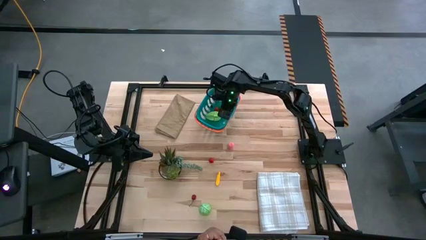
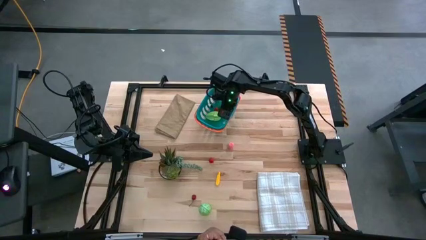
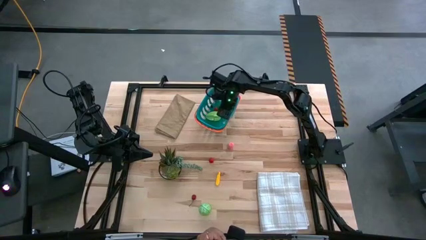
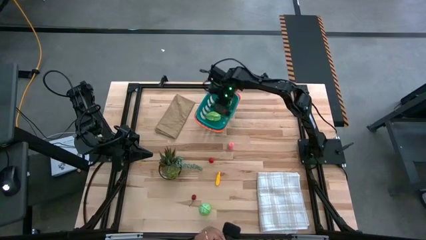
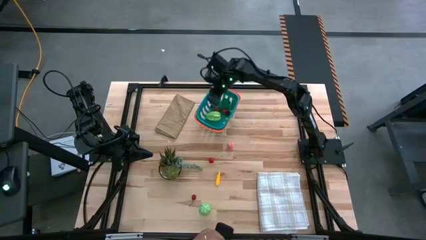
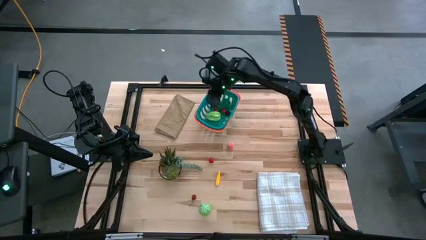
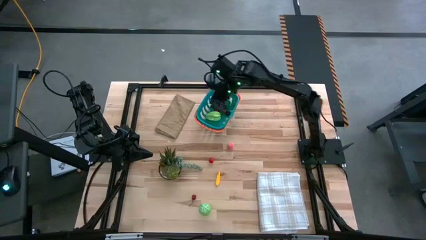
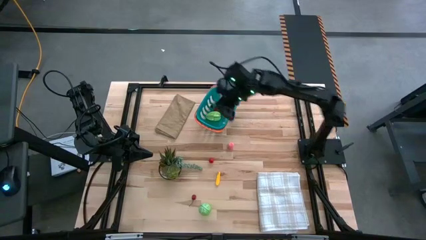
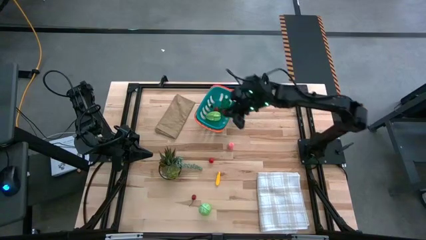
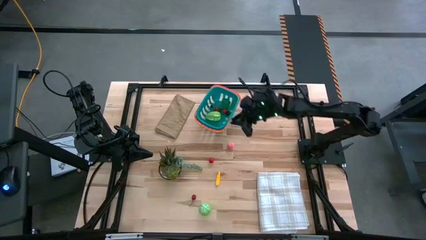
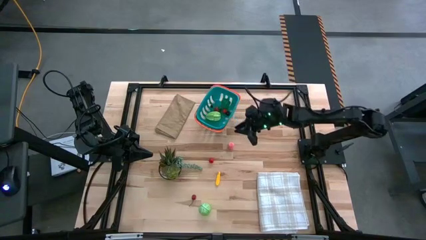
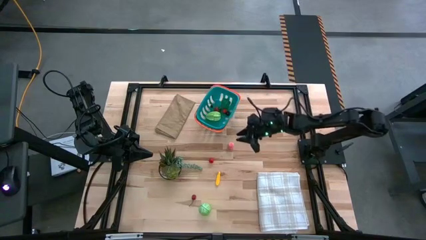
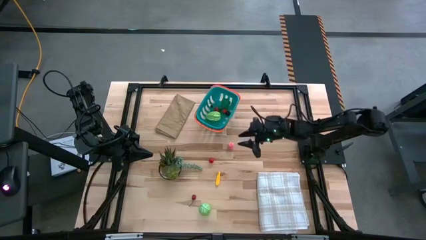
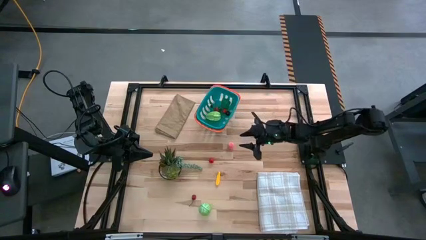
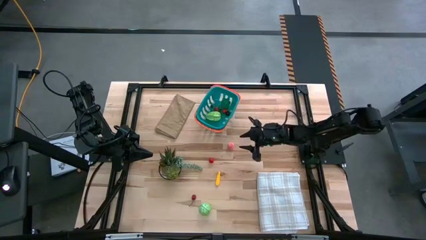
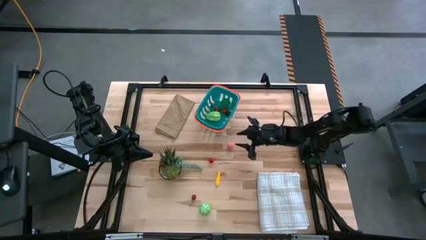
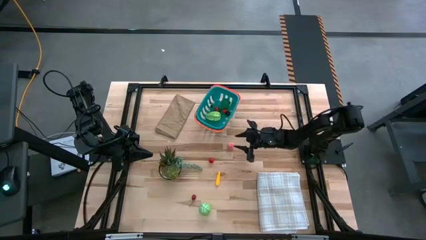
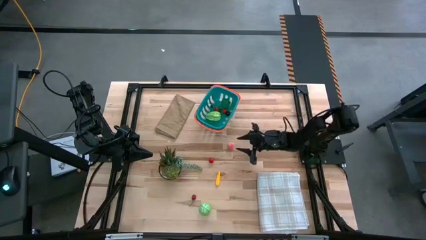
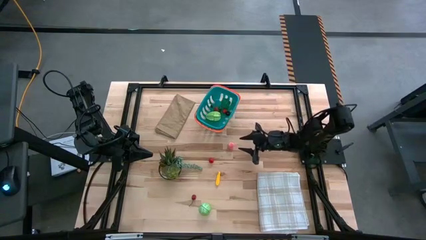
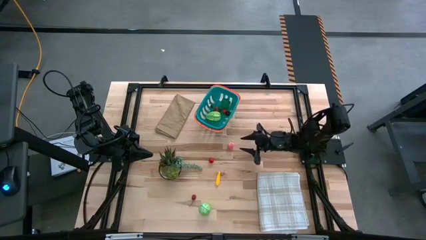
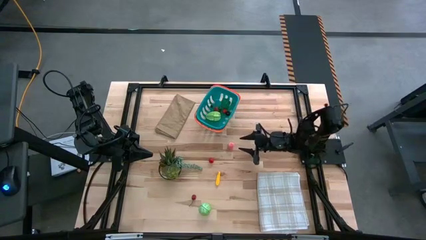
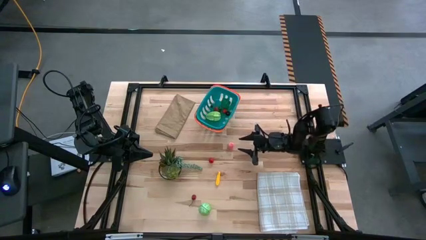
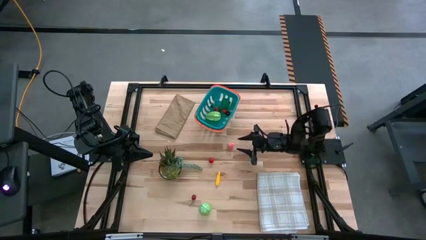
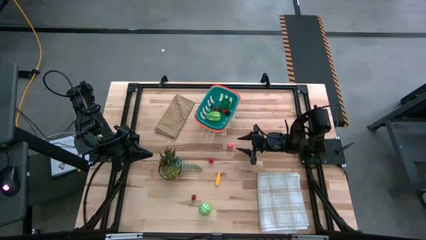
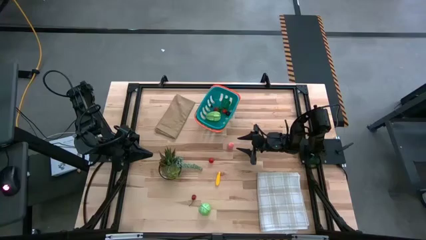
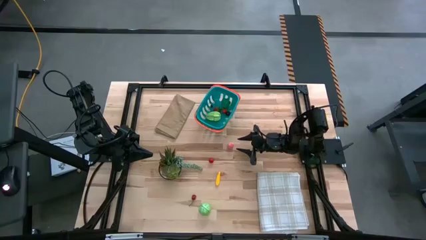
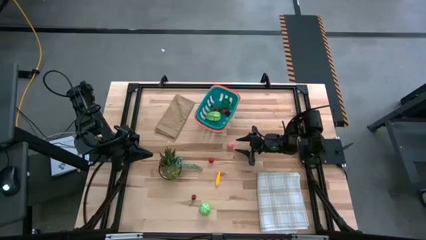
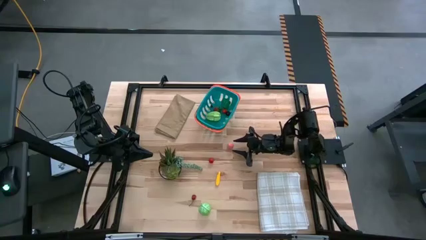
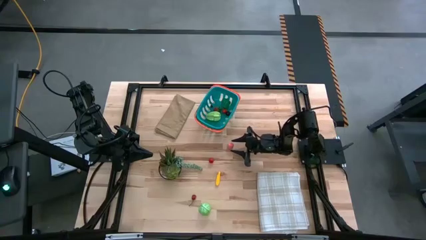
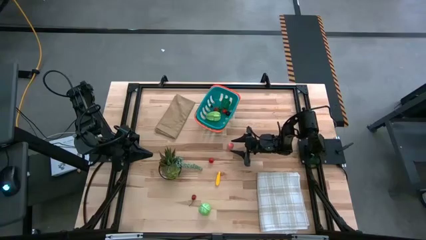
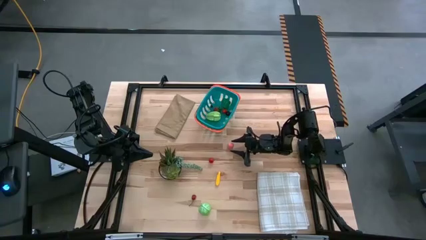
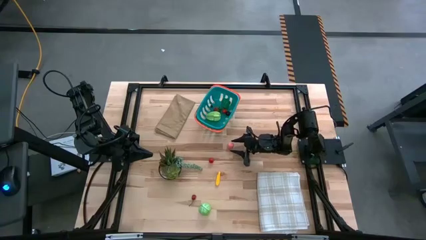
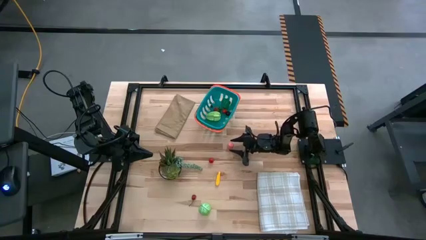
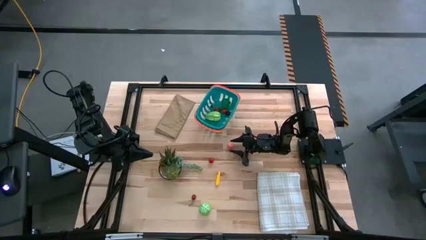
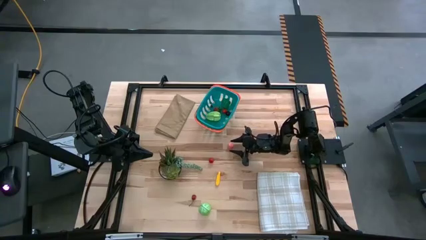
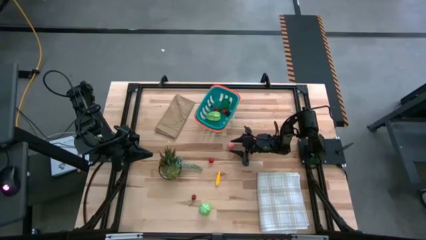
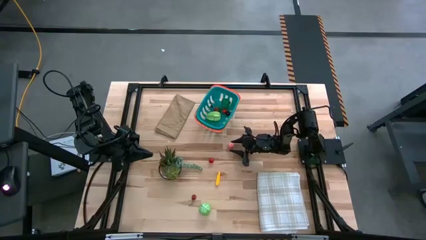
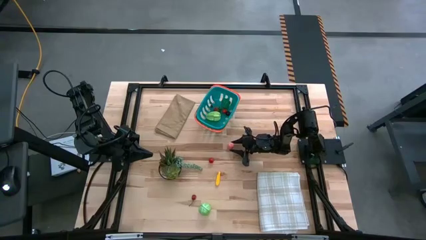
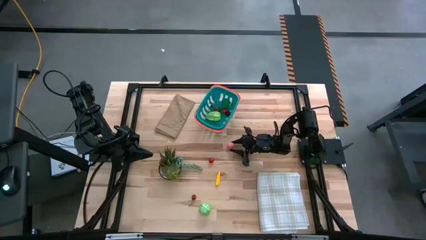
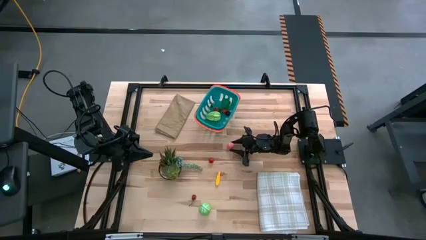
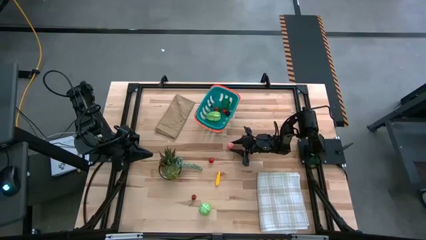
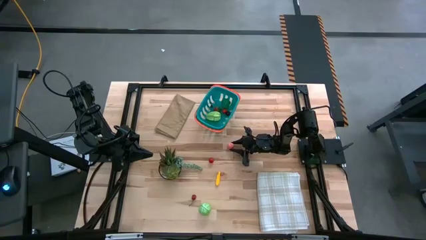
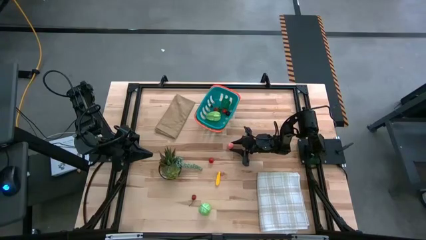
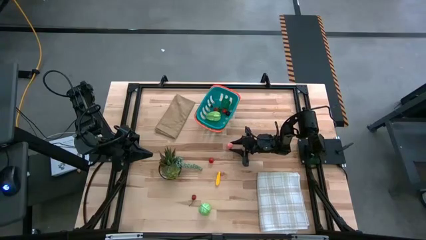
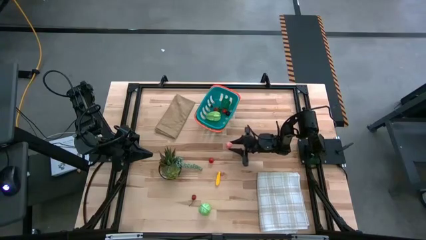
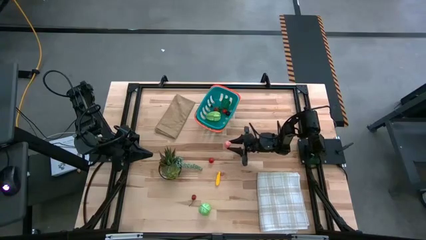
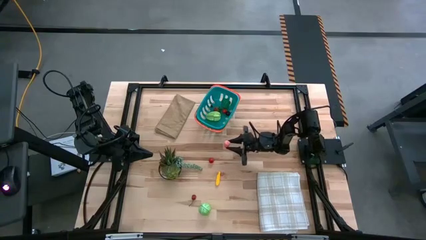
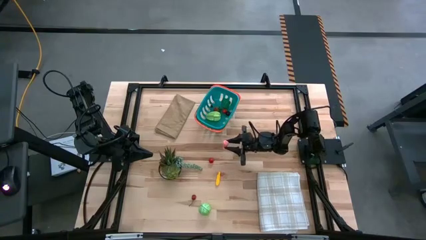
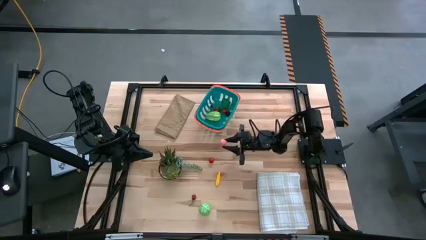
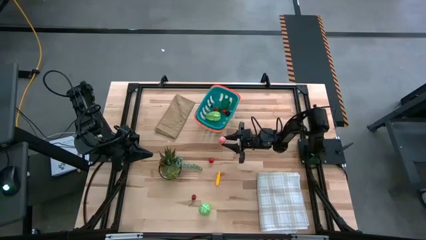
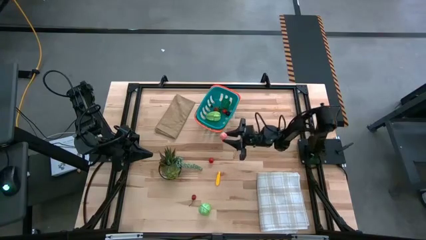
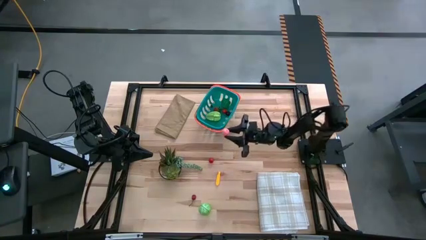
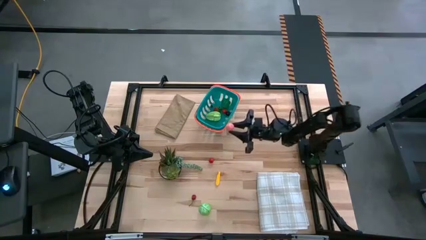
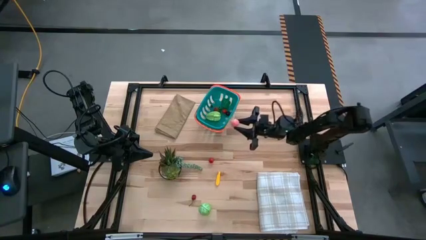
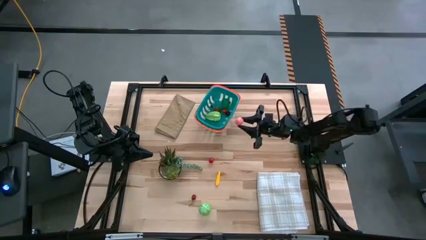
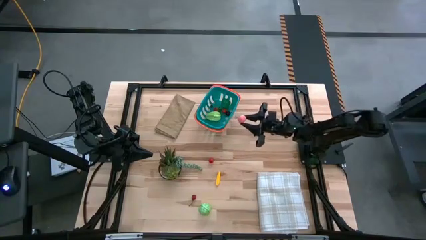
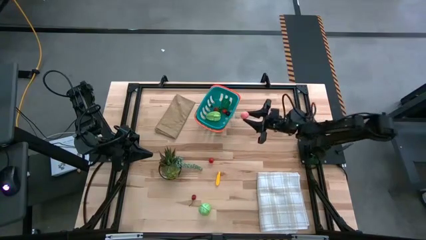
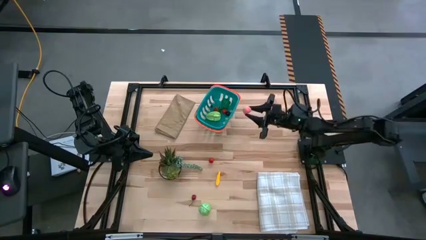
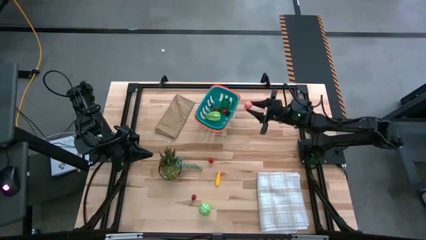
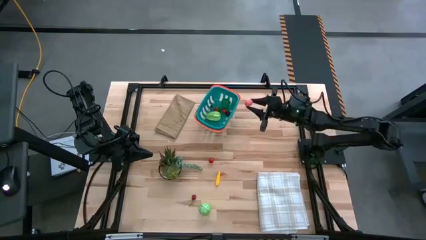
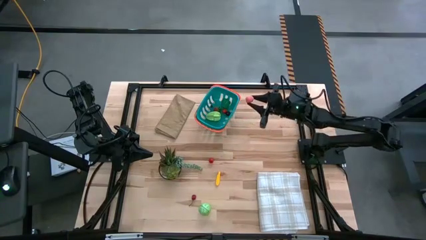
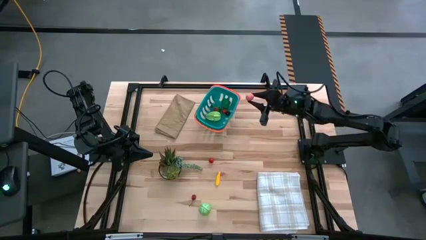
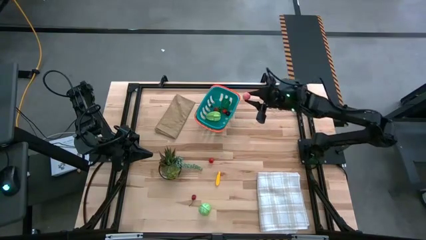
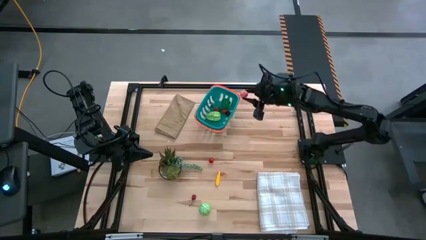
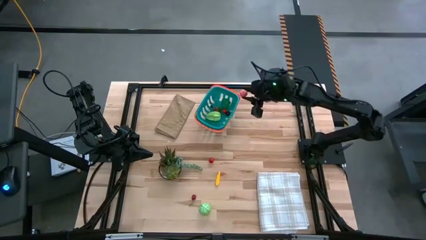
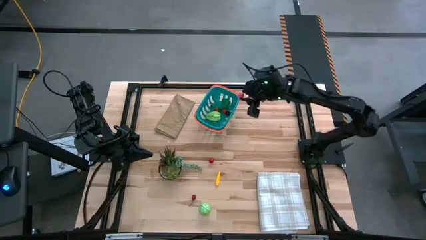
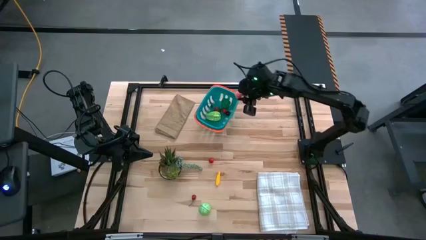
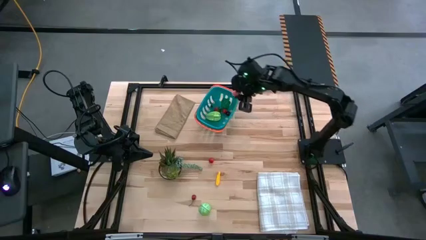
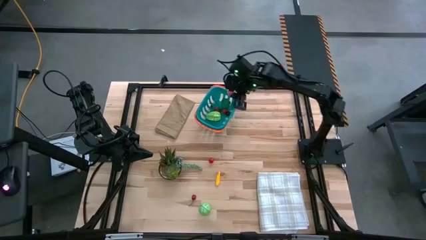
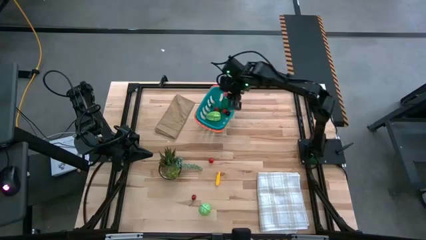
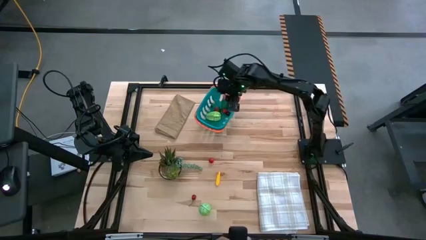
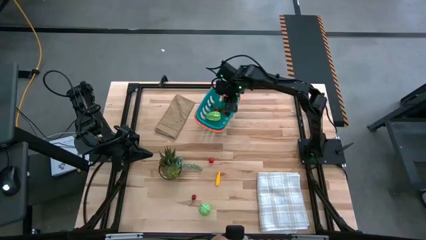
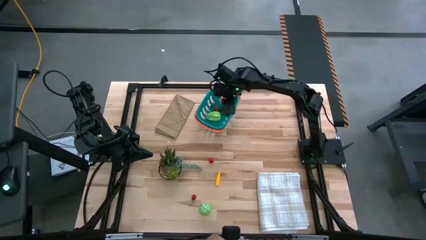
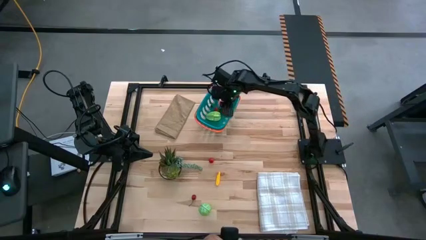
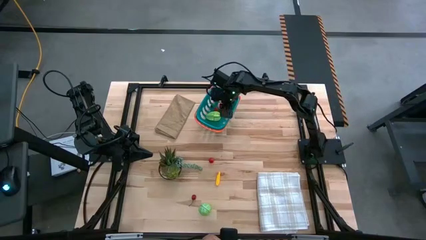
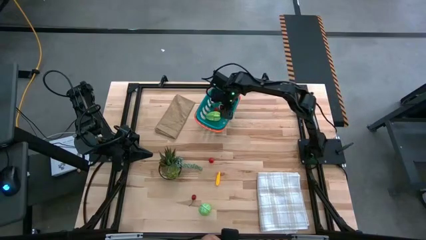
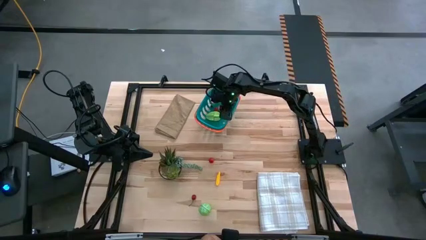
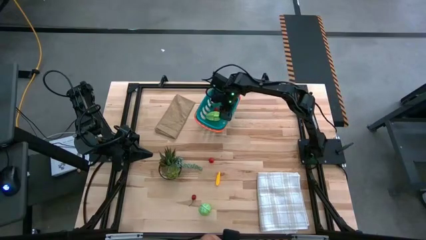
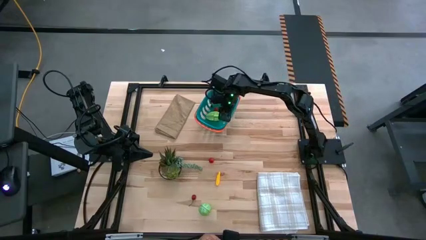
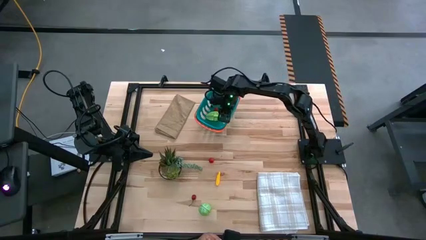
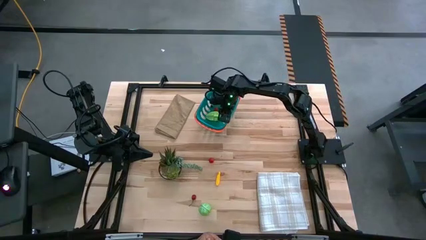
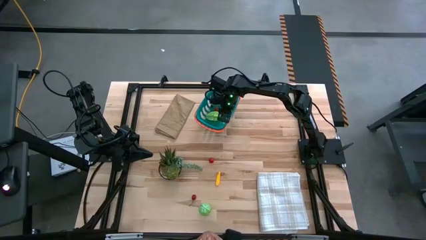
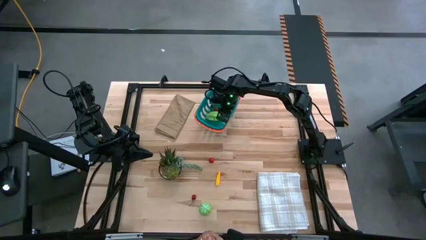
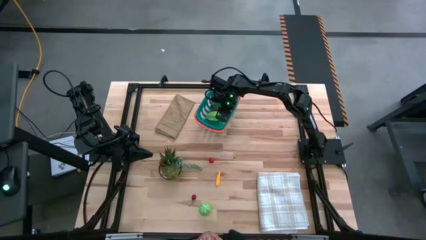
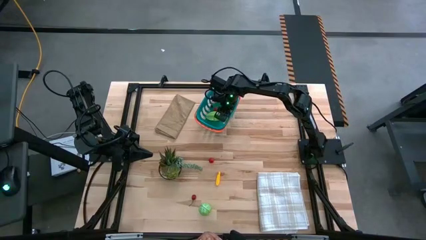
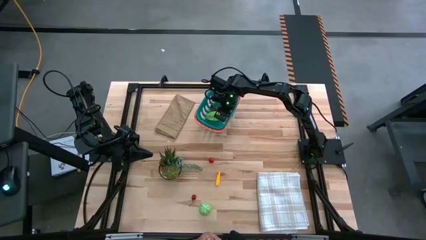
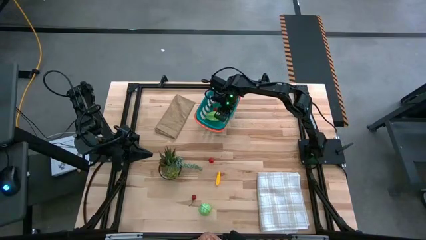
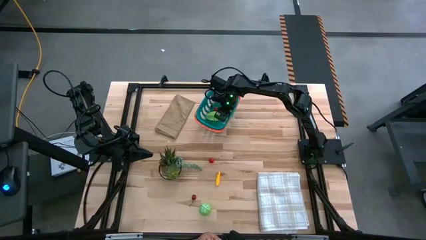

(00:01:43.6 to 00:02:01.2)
Task: Pick and placing Produce into tupperware
Put the pink peach in the green basket
